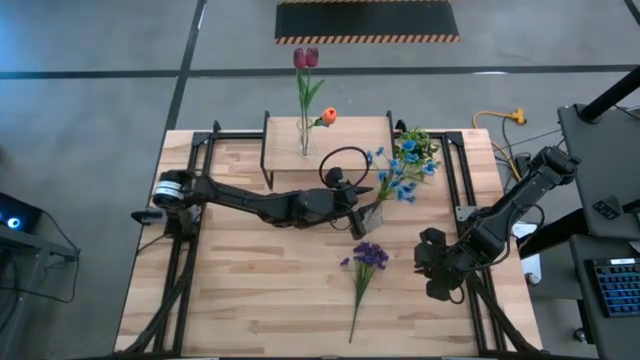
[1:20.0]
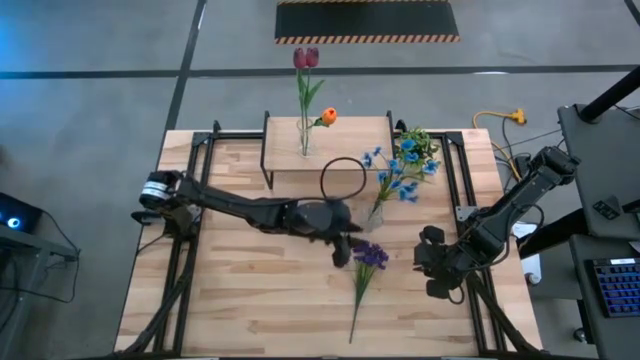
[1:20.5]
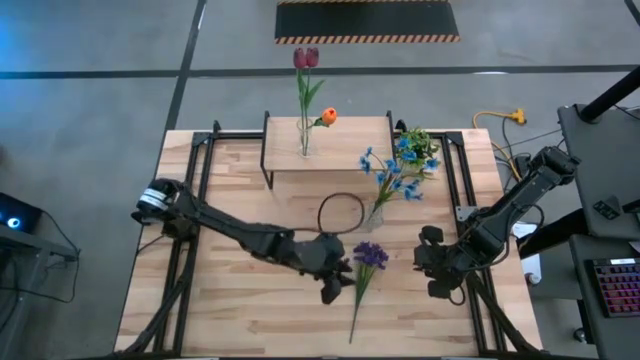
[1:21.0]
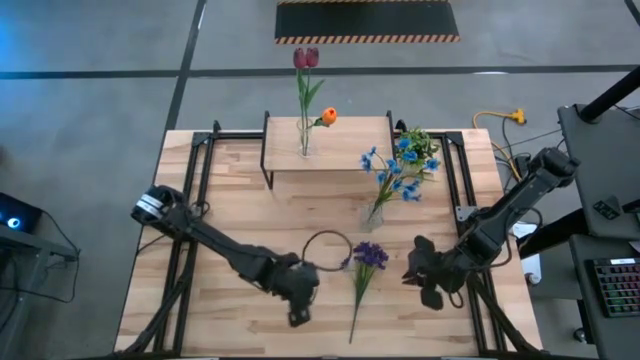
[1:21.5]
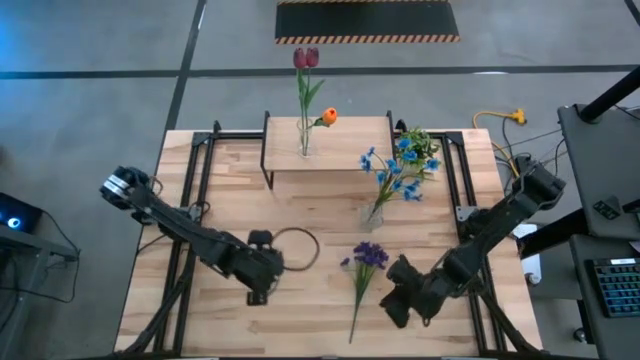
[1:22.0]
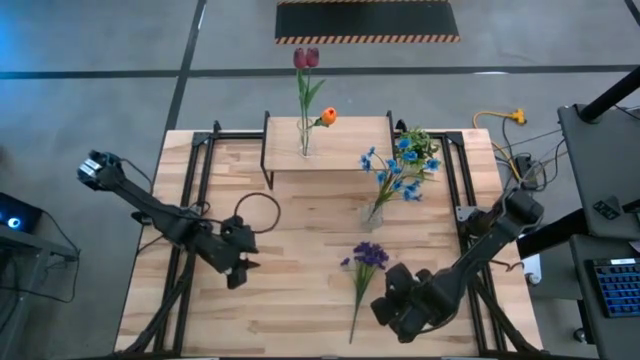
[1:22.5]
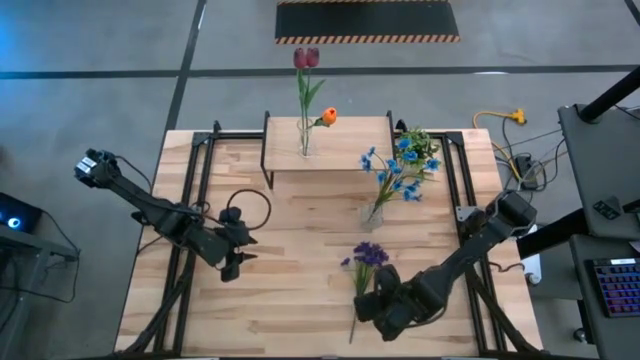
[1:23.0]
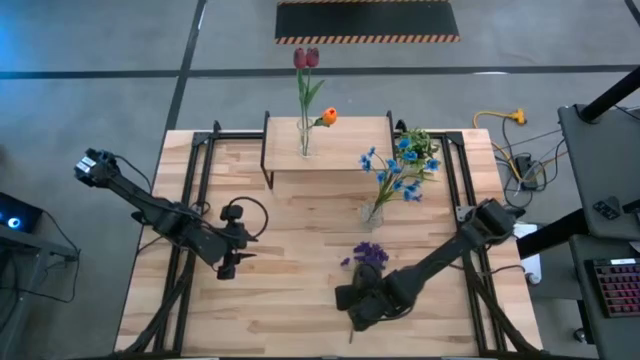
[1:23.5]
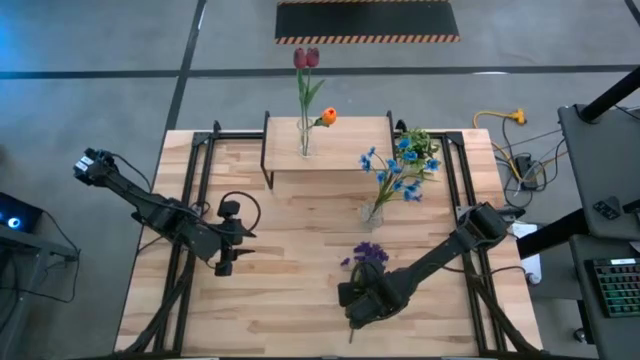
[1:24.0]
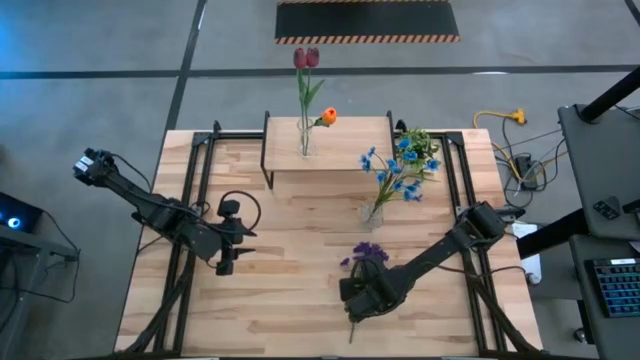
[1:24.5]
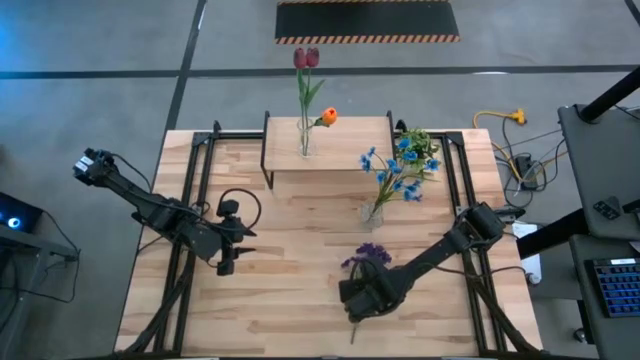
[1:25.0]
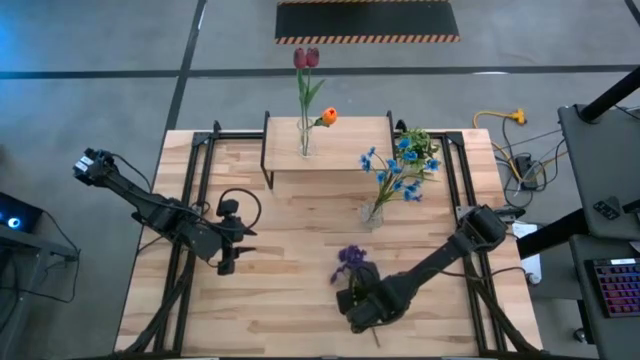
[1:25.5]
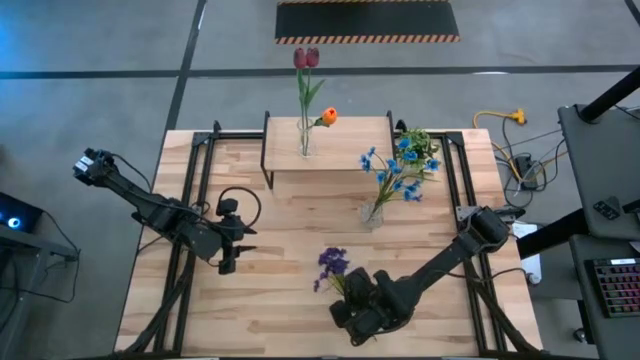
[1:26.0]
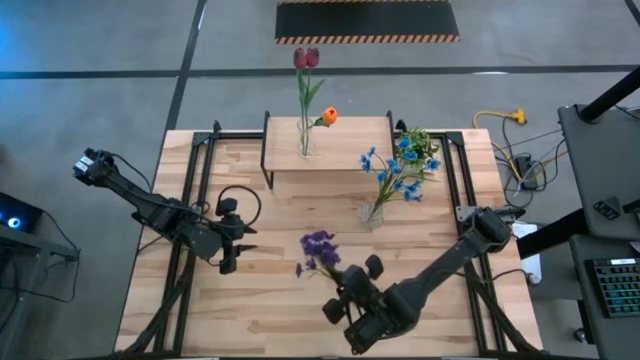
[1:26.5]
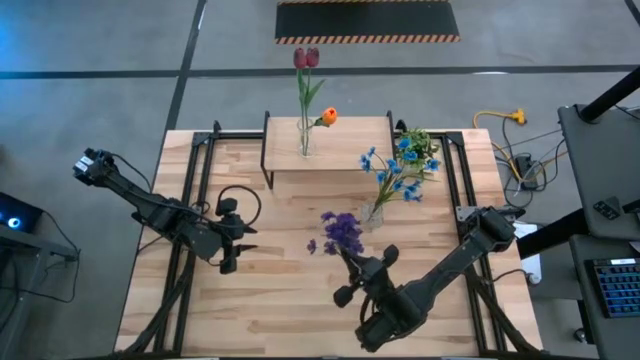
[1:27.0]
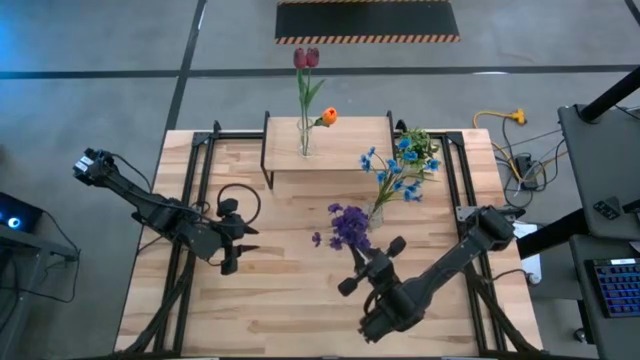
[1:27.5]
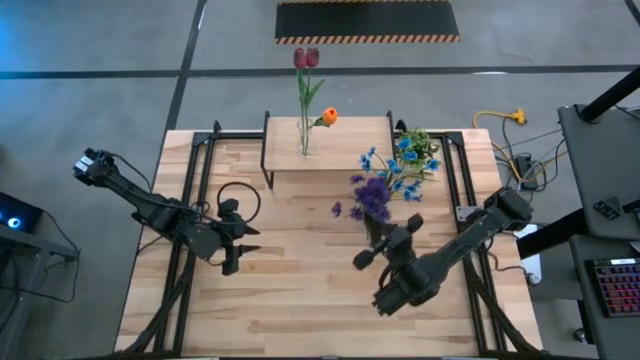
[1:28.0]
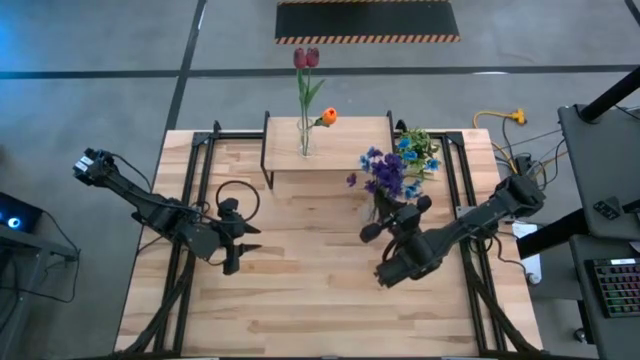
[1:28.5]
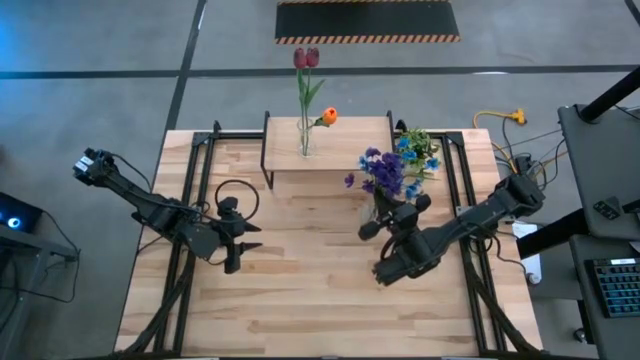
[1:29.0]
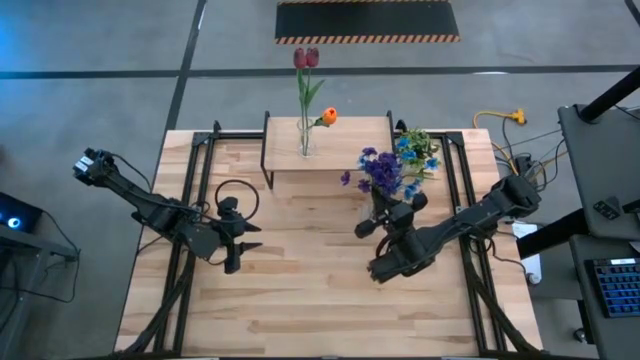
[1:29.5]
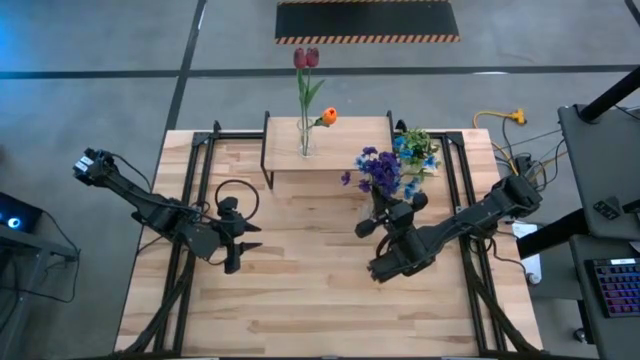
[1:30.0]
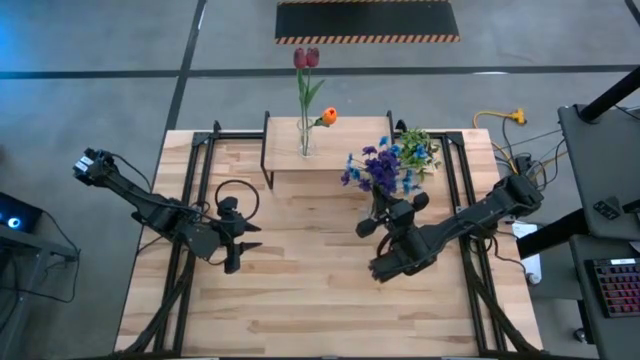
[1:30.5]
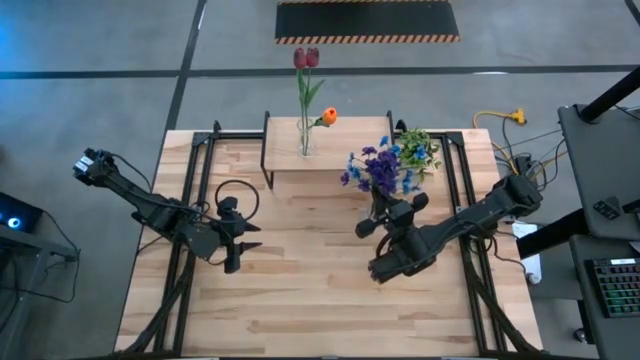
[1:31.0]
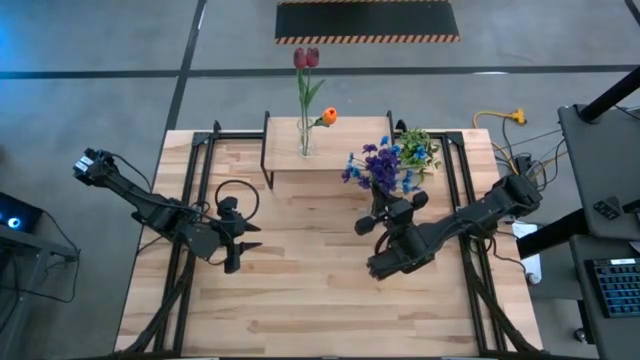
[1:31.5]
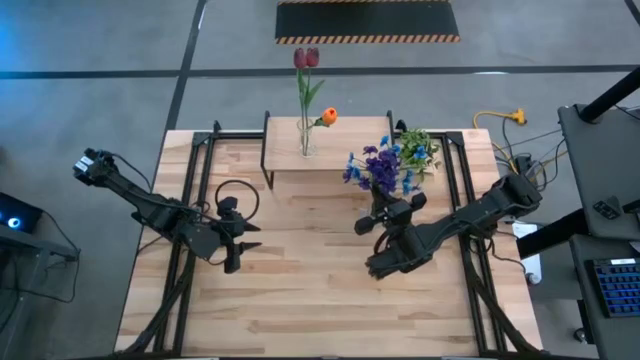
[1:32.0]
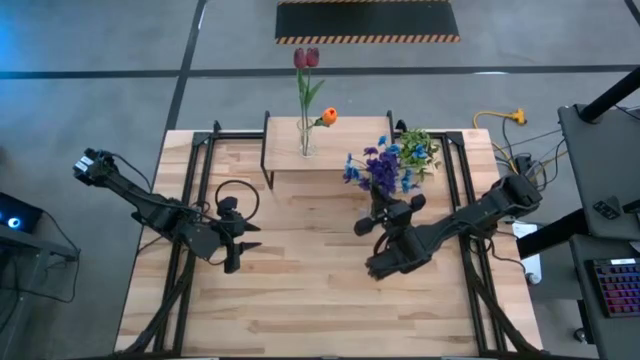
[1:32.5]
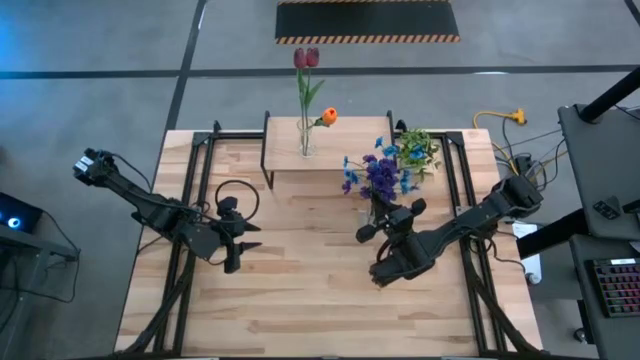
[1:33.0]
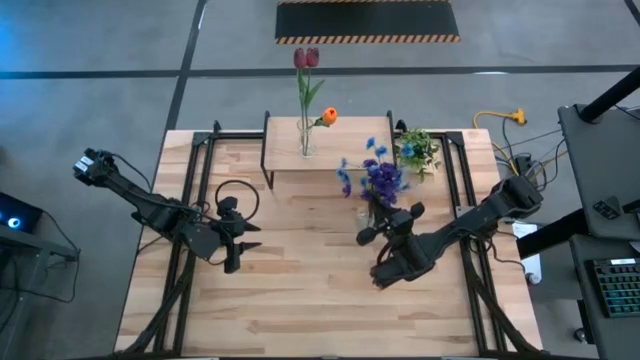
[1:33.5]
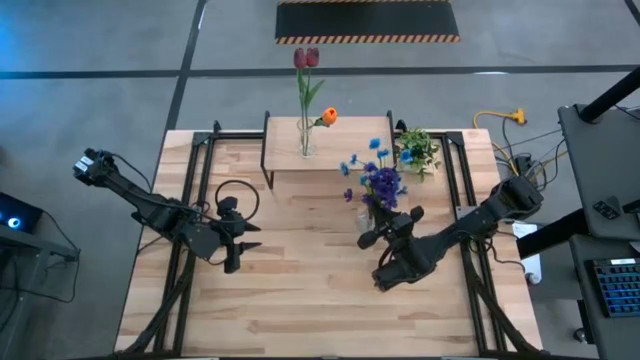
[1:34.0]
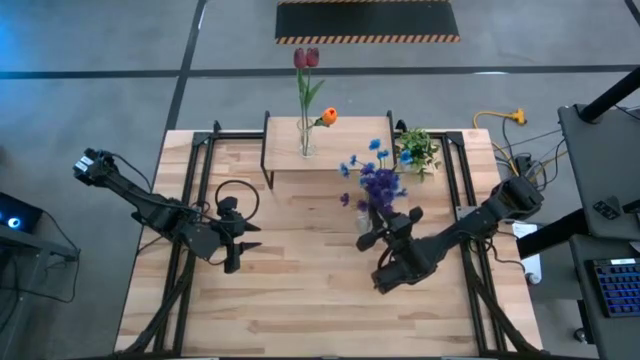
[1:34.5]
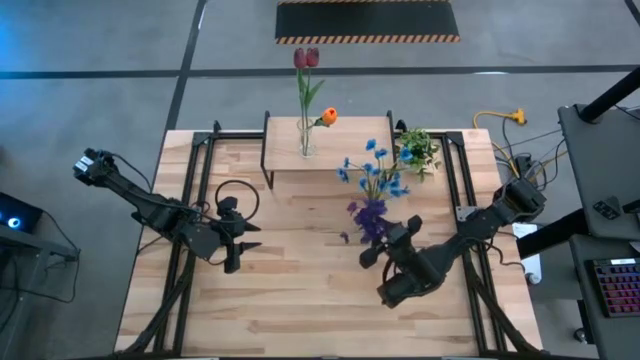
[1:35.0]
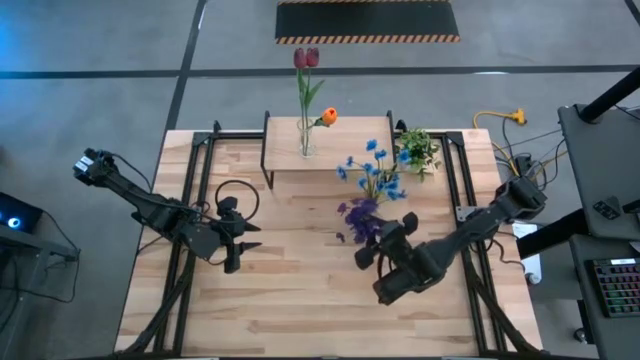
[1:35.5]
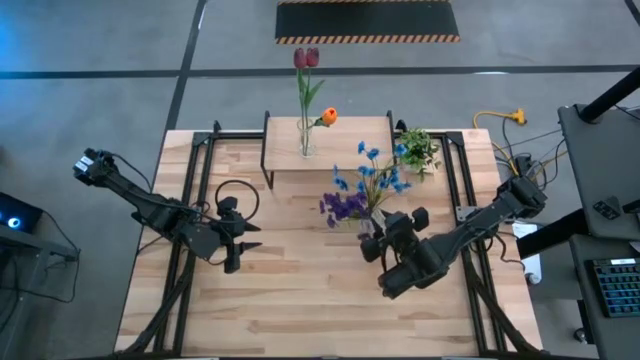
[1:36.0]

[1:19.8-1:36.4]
Task: Pick and place flowers into a vace then onto a shelf
Put the purple flowers into the transparent vase

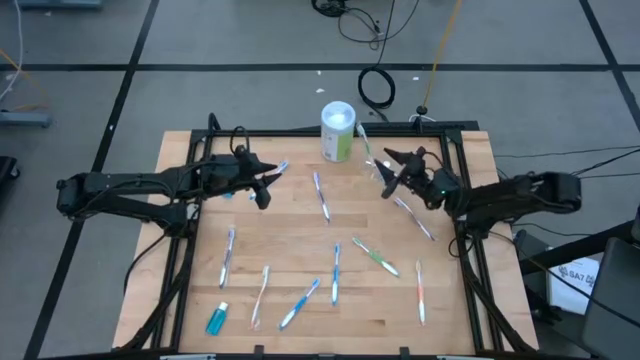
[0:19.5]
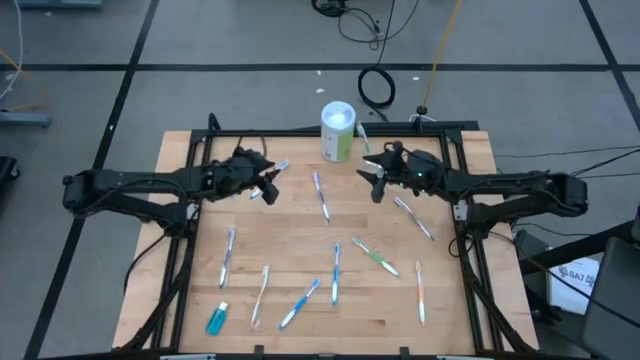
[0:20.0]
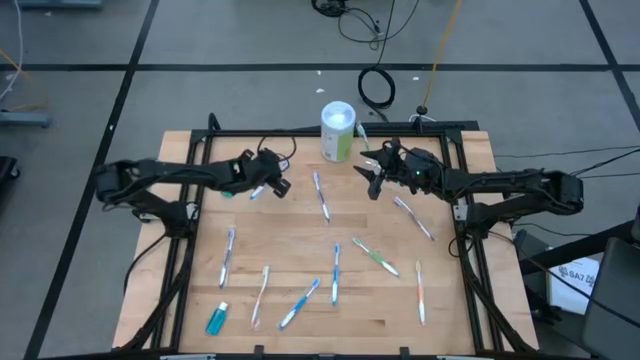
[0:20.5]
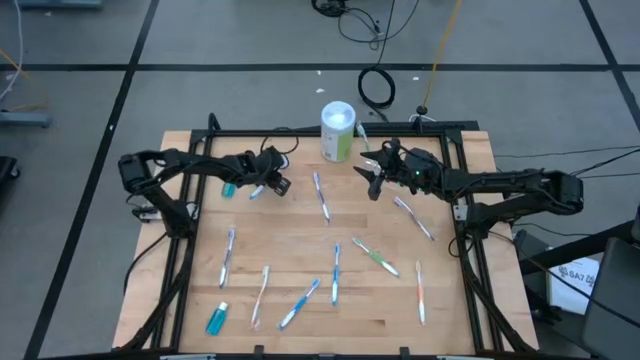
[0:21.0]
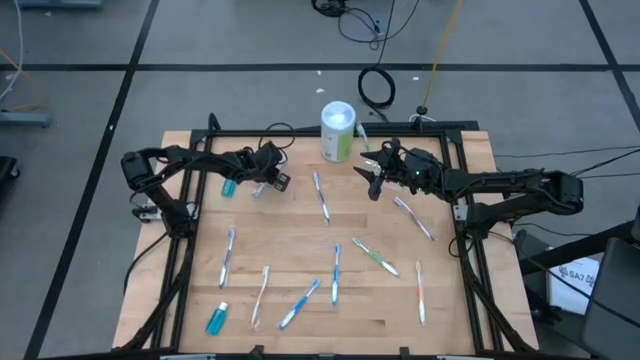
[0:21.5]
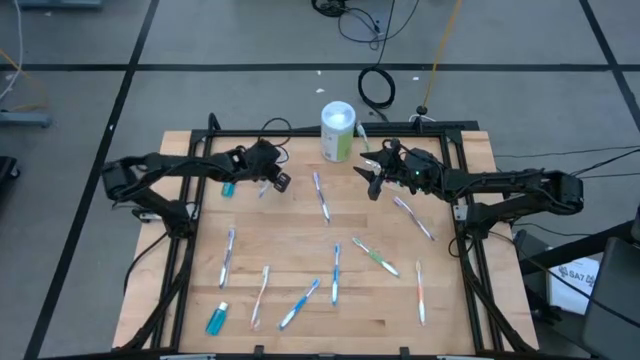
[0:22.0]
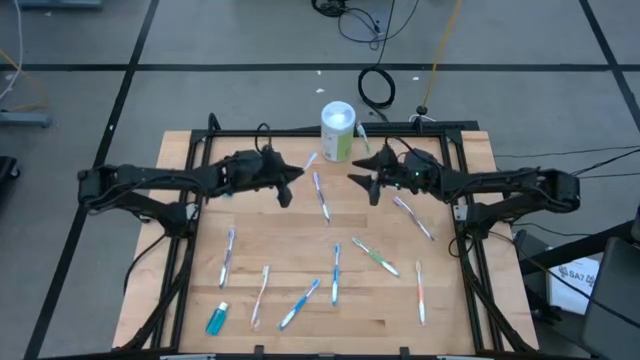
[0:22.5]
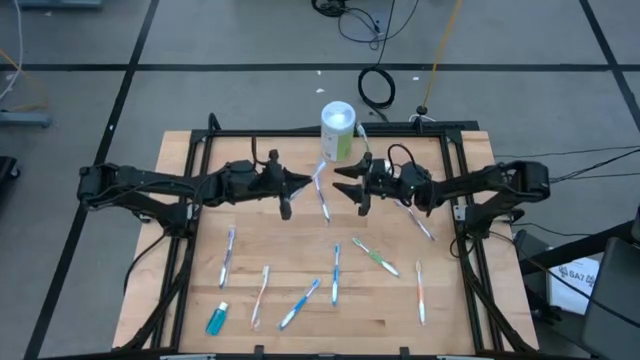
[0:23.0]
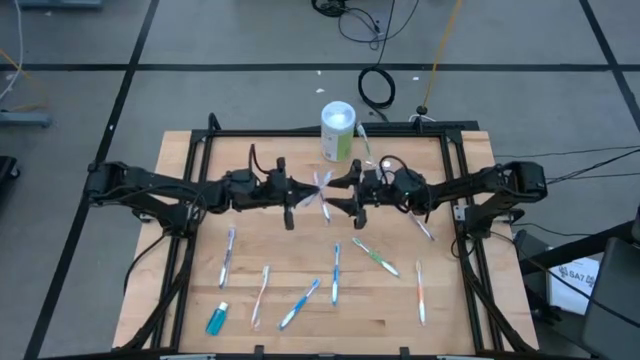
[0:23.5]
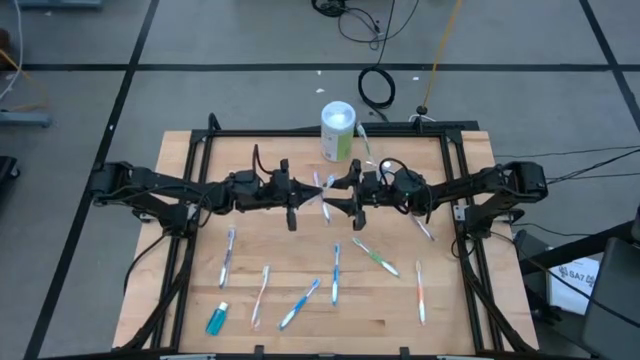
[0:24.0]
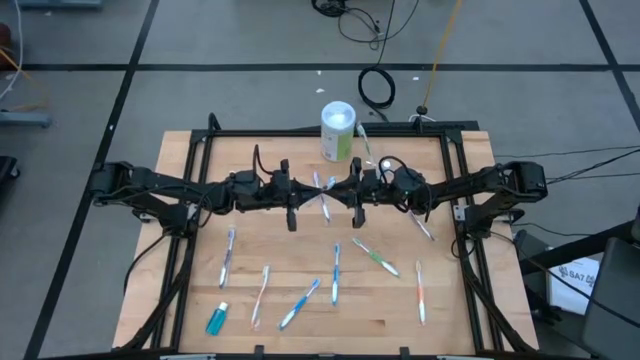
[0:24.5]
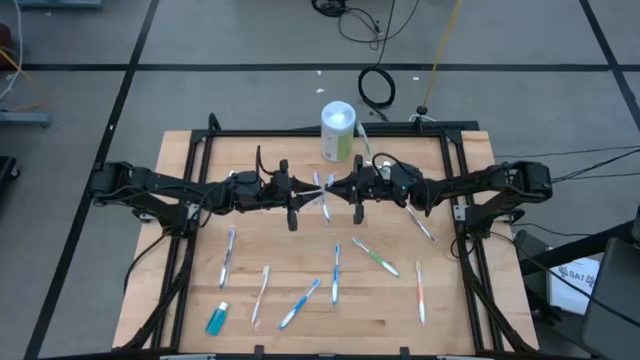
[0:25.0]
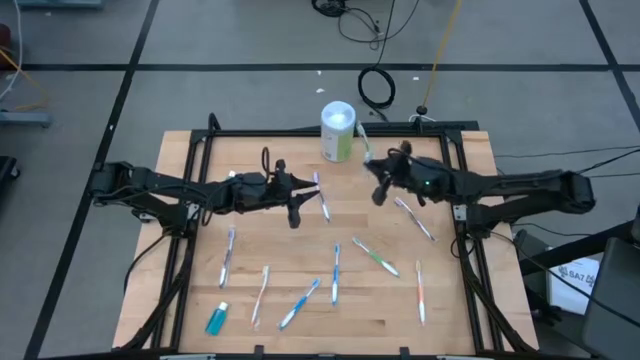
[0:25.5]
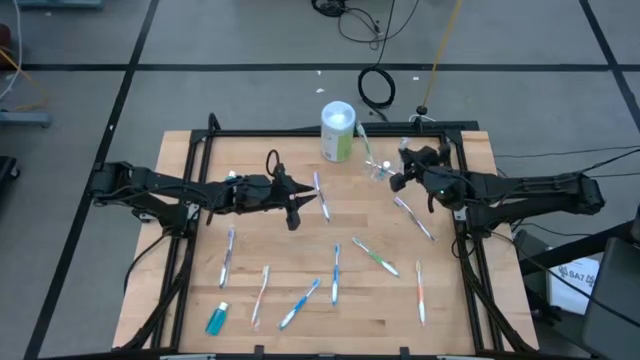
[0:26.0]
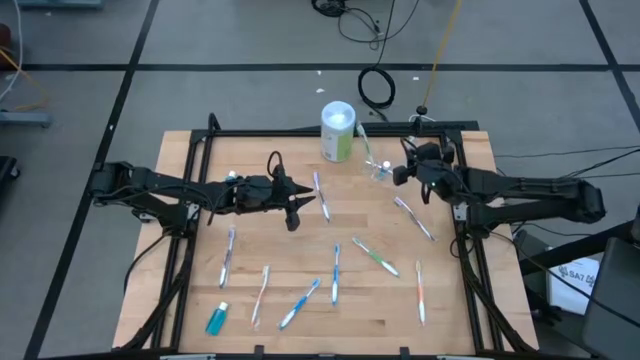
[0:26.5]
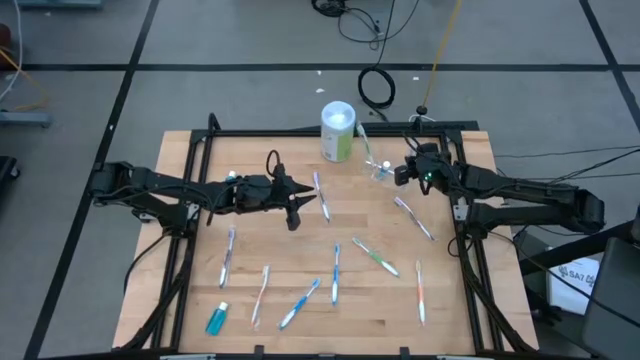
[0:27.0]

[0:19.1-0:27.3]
Task: Pick & Place toothbrushing station
Put the top blue toothbrush into the transparent organizer
